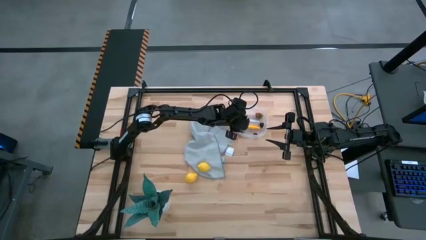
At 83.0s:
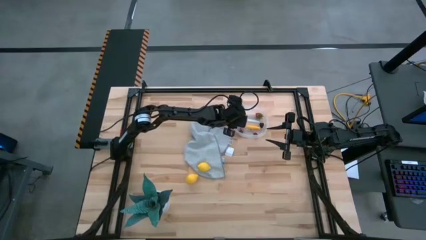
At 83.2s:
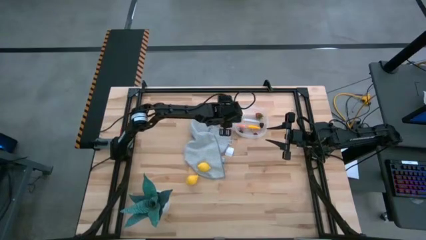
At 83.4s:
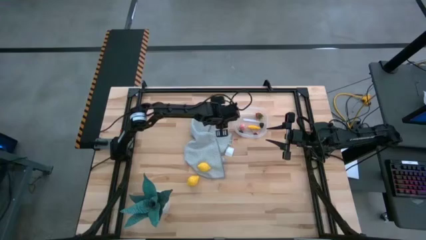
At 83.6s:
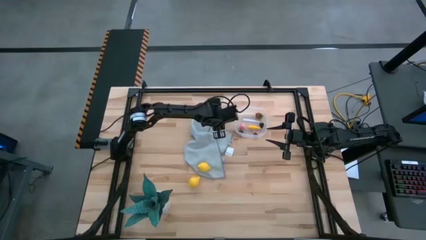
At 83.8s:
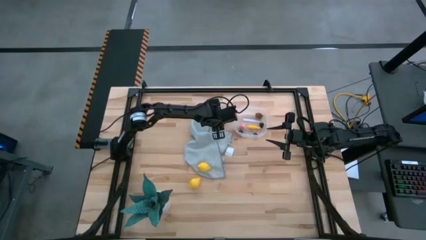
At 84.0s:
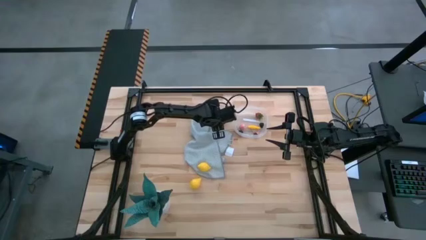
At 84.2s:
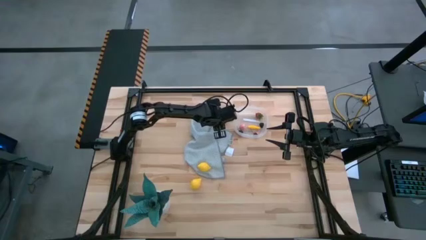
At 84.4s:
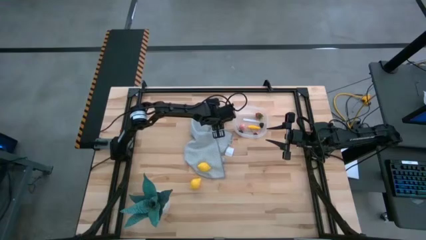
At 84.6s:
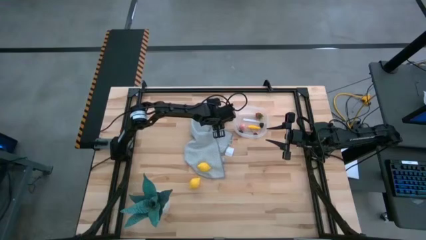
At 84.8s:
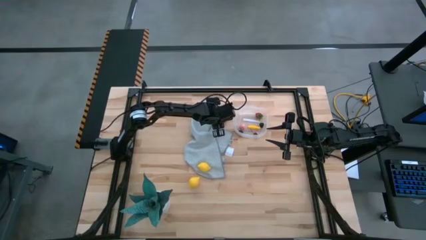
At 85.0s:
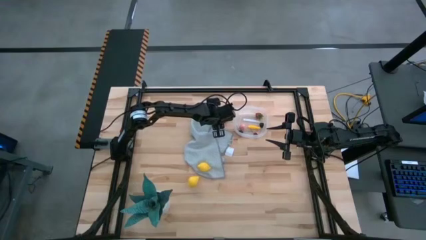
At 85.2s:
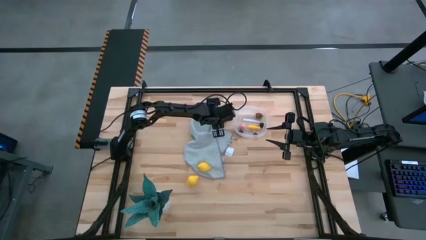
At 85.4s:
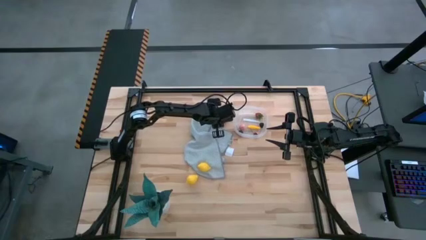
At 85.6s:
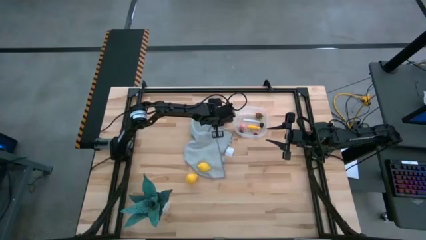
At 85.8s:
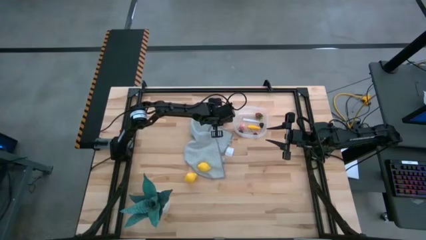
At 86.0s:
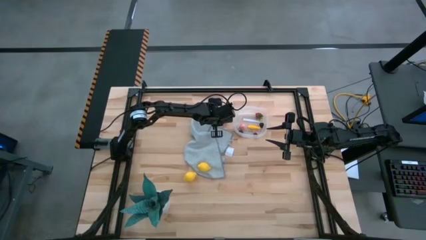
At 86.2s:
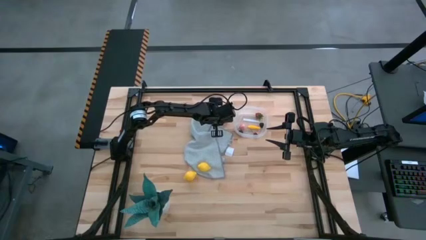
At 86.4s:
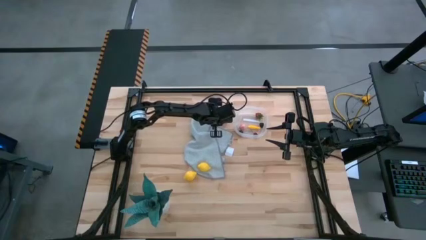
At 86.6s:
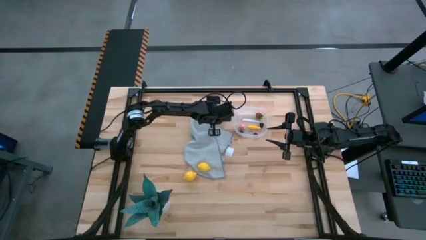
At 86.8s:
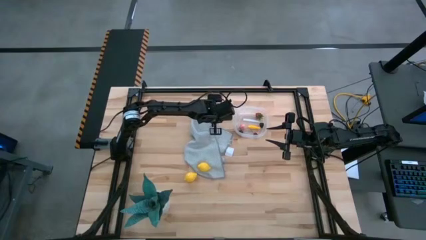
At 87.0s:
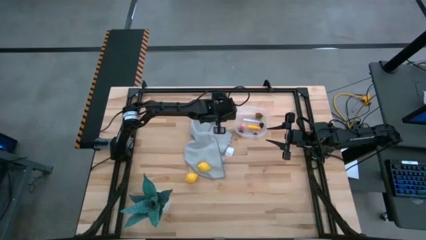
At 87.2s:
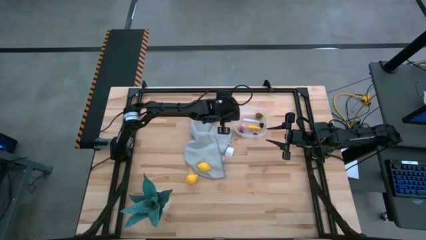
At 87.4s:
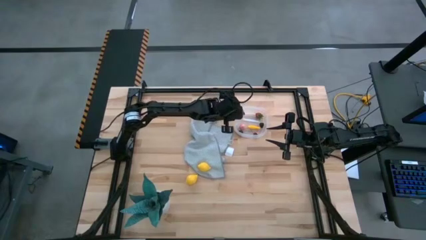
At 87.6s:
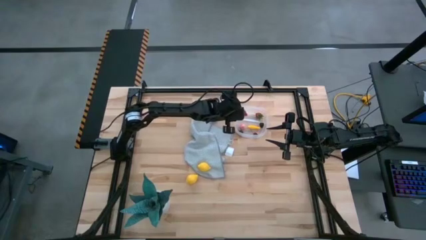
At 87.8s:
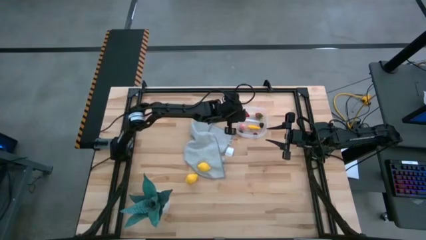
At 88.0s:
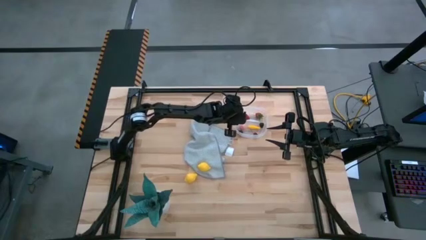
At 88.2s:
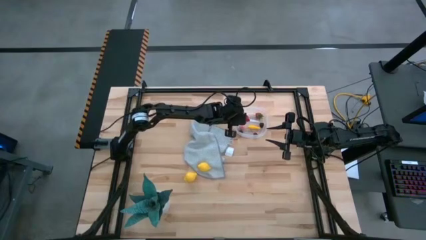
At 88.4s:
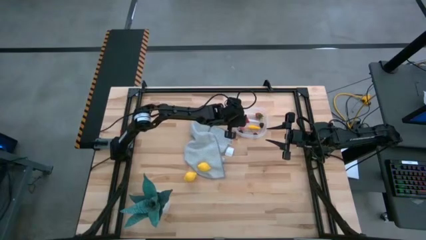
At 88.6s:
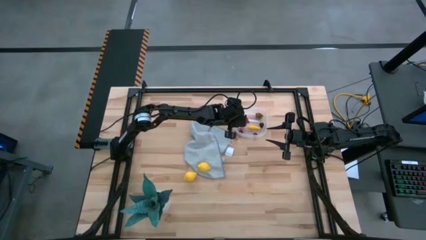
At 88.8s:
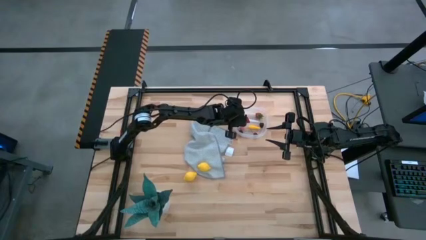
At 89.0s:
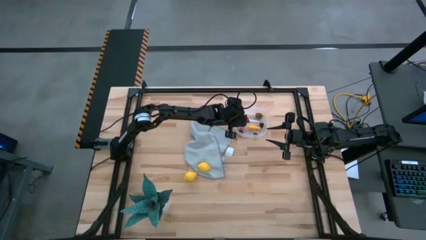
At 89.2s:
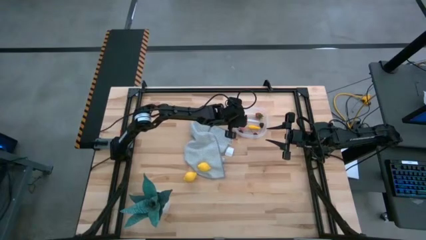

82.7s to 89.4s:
Task: Pick and placing Produce into tupperware
Put the red strawberry into the transparent bin

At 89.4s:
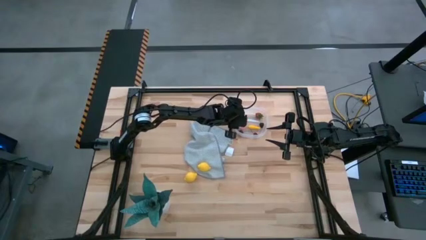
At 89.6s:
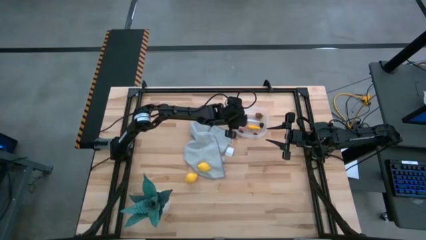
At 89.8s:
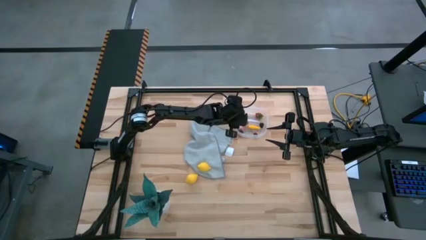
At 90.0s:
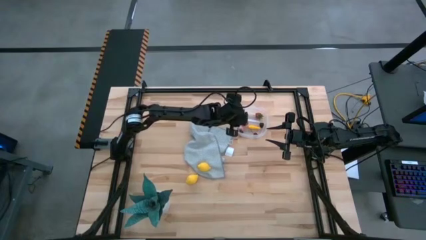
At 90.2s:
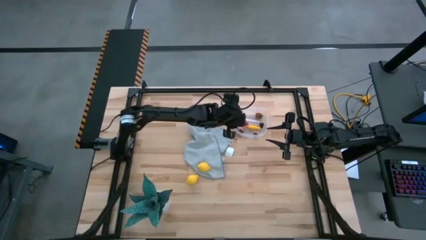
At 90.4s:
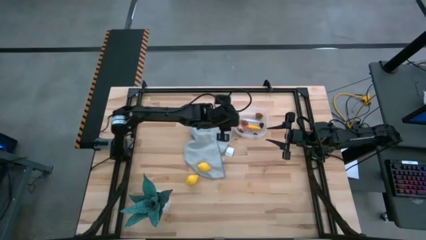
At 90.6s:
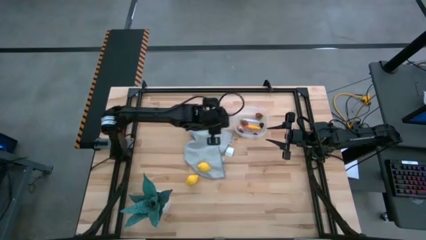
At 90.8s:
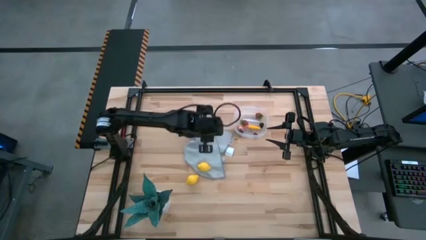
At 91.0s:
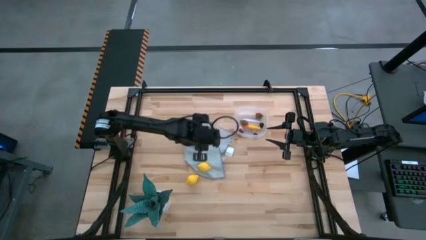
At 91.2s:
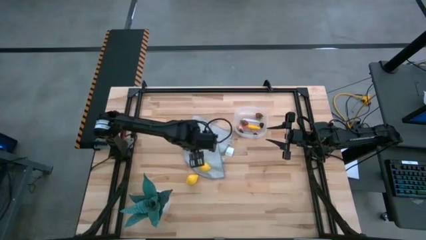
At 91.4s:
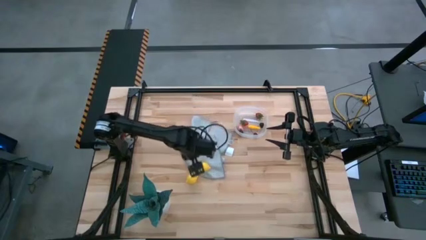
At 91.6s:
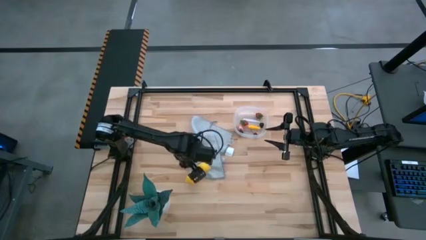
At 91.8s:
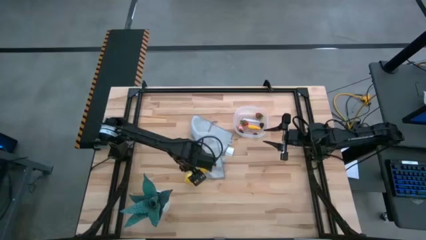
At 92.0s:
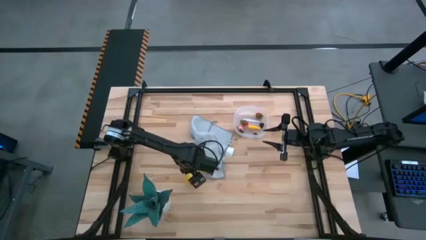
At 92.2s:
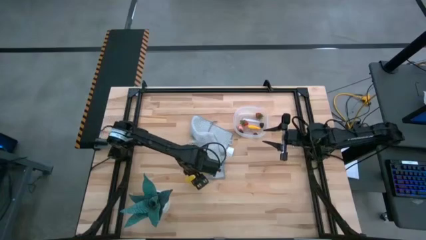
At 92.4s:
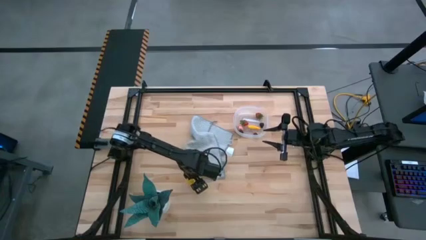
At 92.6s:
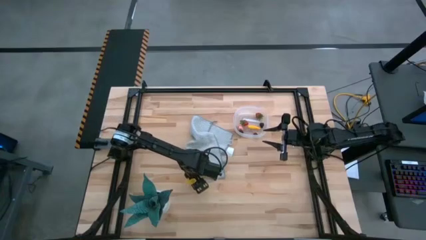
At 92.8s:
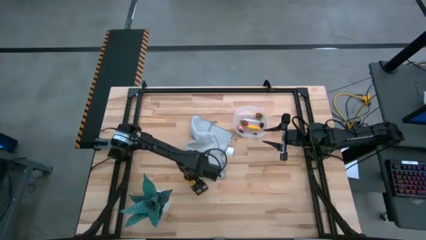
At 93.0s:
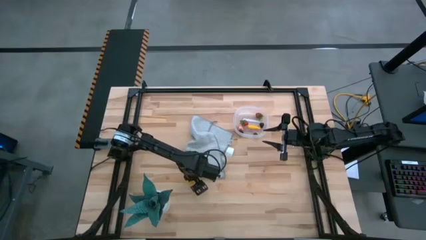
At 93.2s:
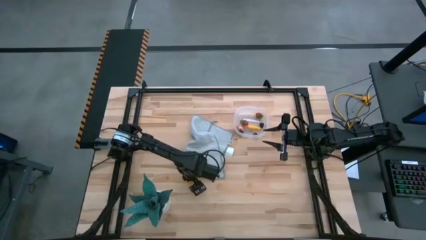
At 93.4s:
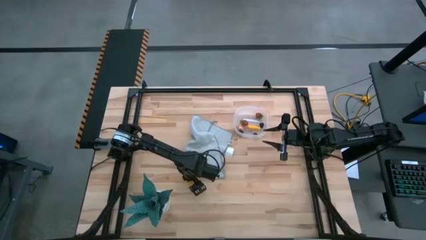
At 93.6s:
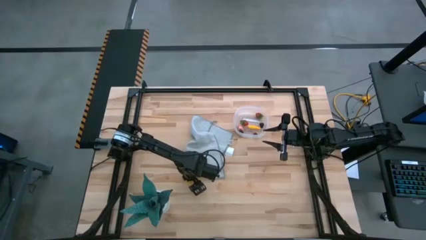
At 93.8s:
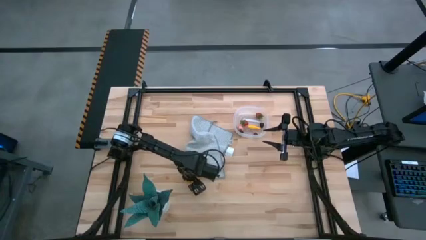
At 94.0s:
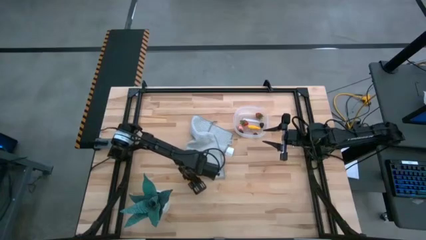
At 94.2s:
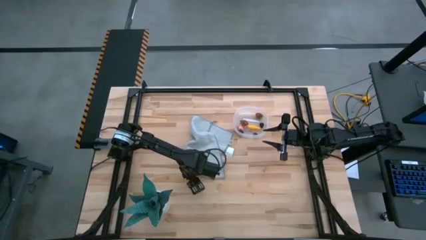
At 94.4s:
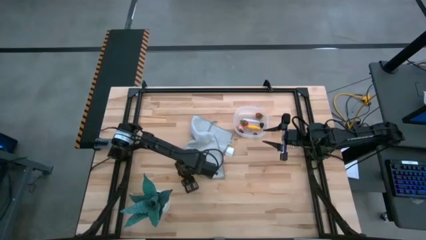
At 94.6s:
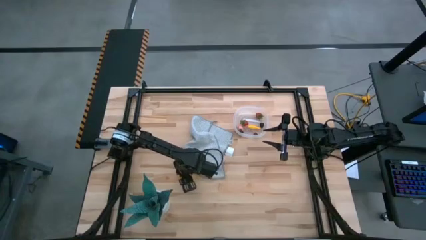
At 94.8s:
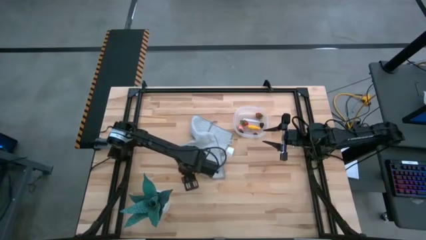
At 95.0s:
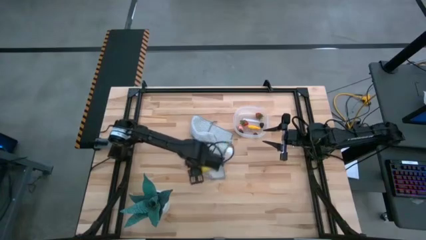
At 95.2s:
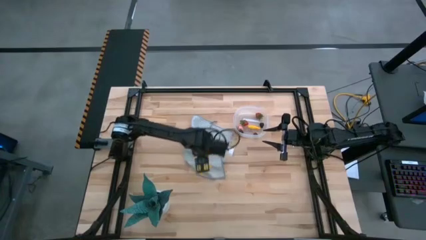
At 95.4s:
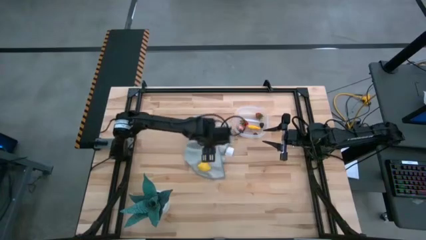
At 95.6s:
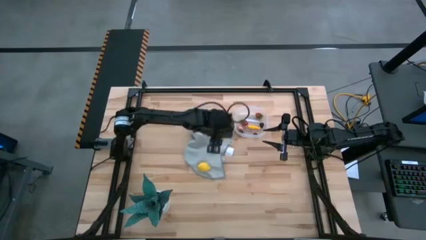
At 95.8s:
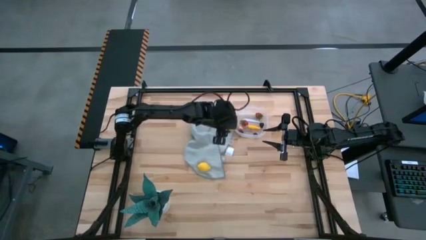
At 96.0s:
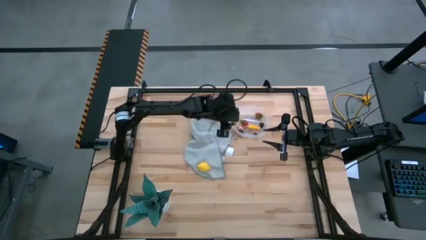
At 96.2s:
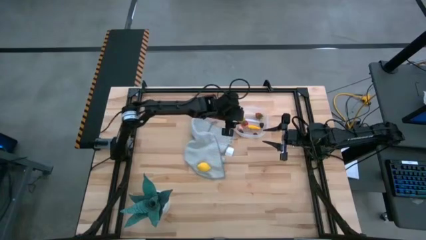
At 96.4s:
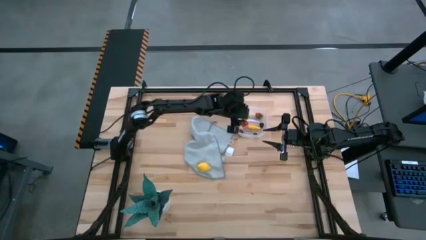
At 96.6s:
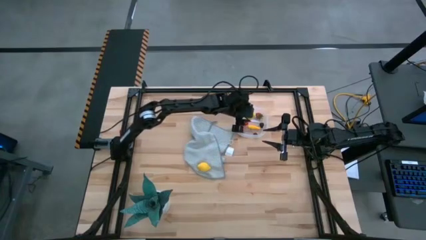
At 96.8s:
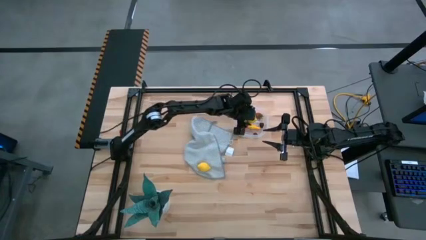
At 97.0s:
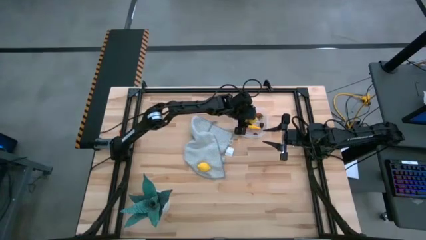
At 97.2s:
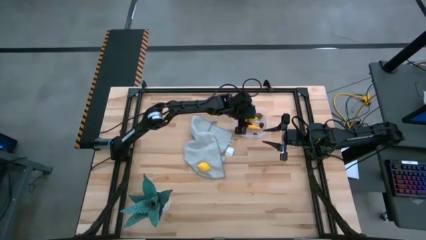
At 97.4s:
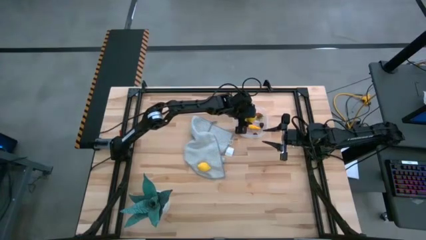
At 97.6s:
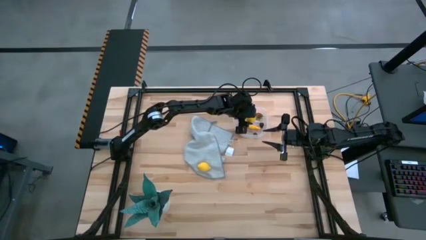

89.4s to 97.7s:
Put the bottom lemon into the transparent bin
